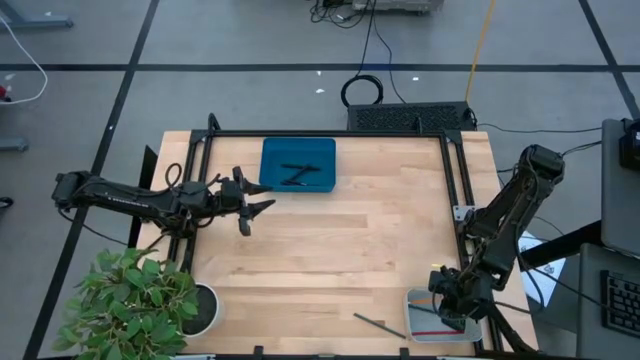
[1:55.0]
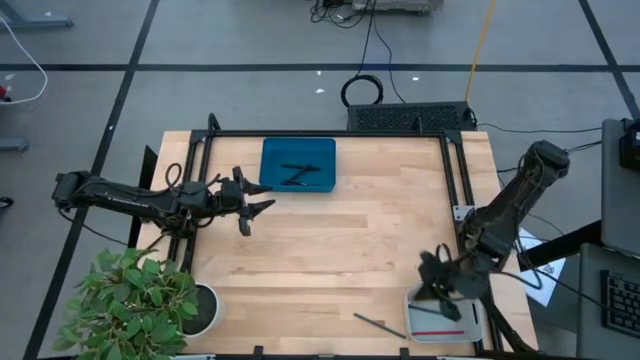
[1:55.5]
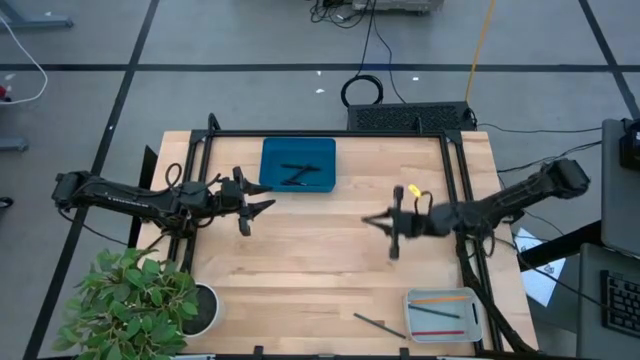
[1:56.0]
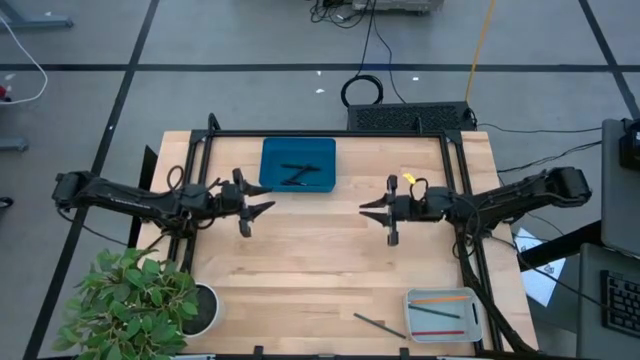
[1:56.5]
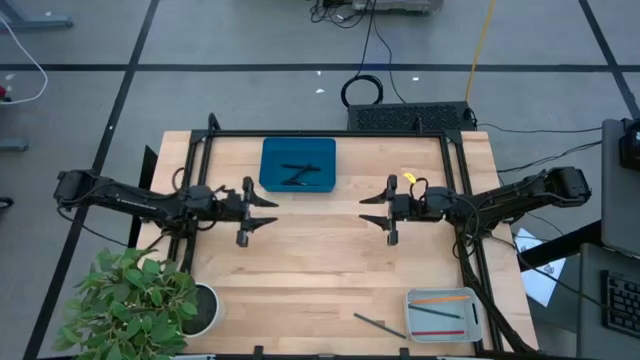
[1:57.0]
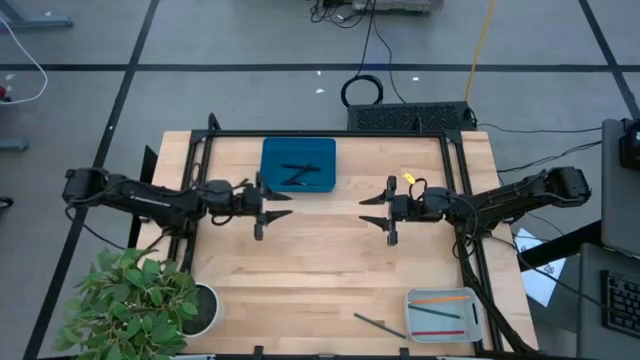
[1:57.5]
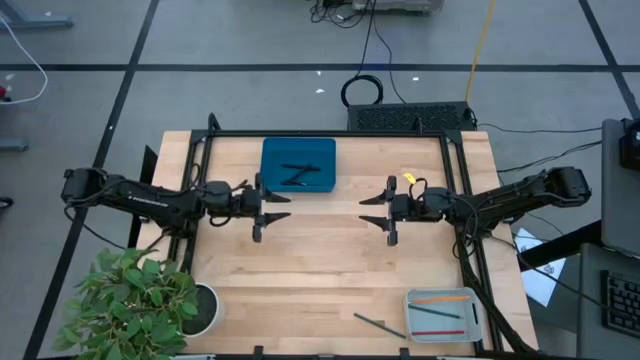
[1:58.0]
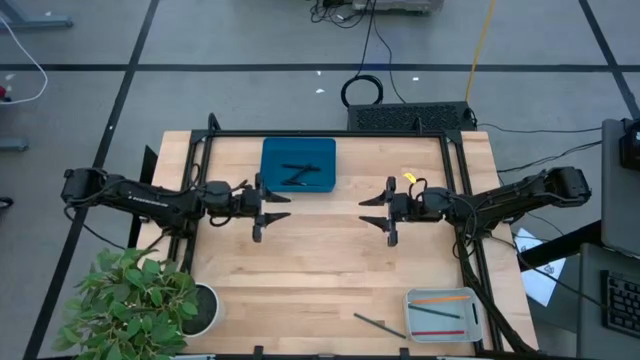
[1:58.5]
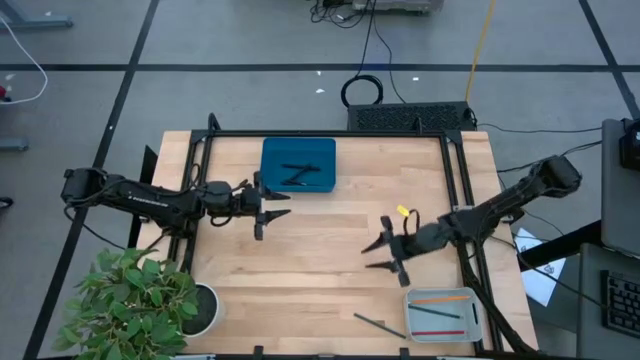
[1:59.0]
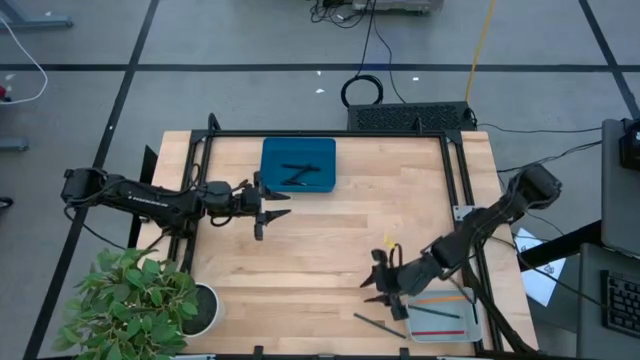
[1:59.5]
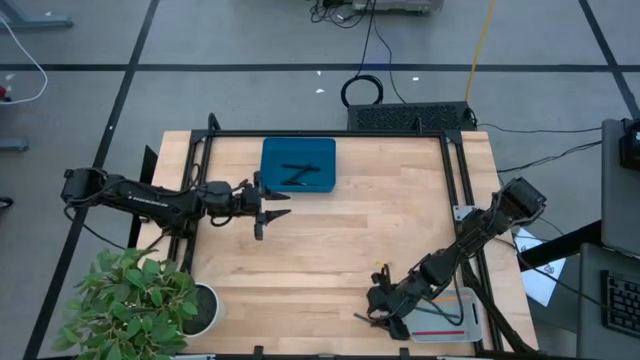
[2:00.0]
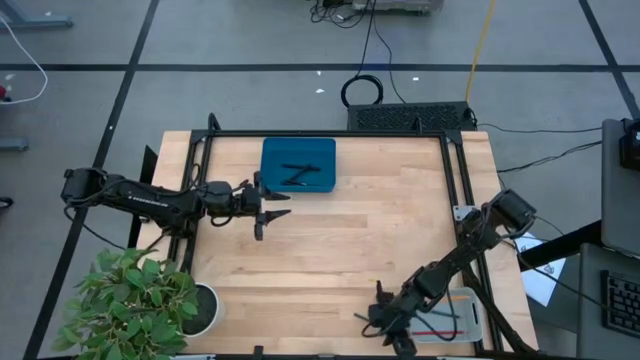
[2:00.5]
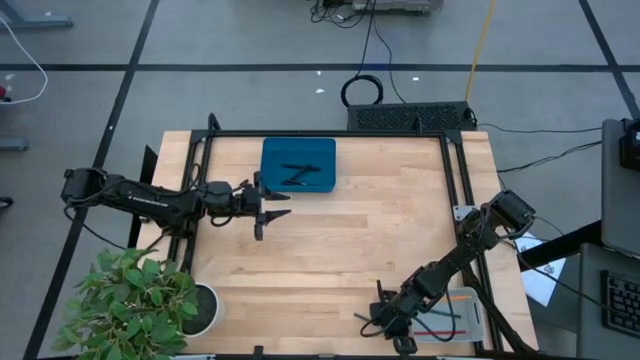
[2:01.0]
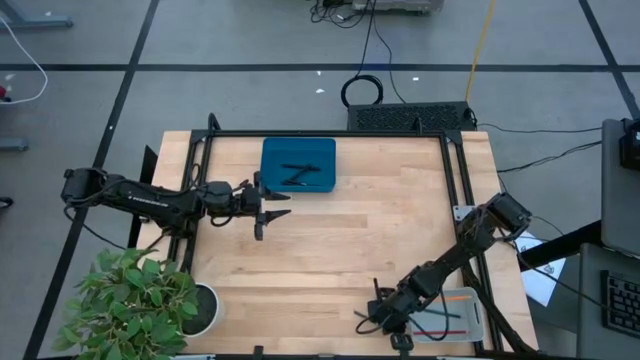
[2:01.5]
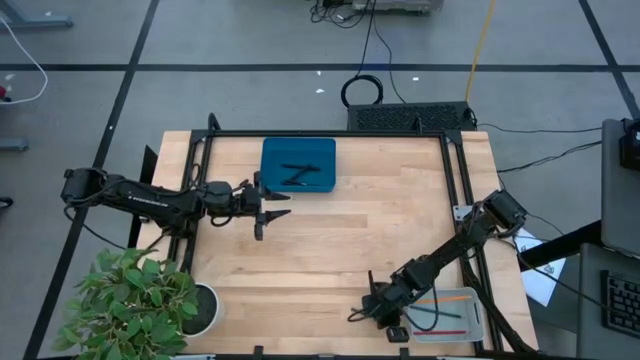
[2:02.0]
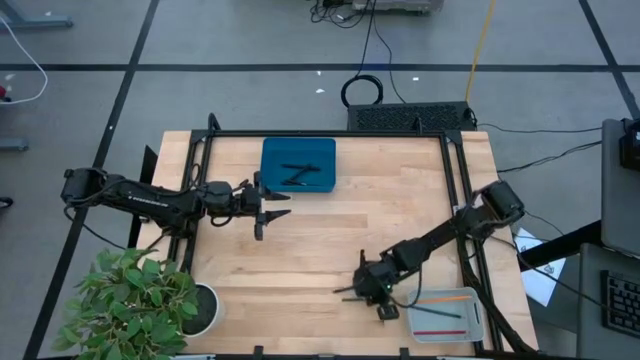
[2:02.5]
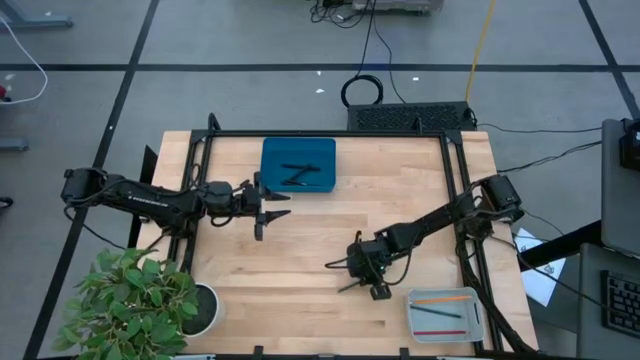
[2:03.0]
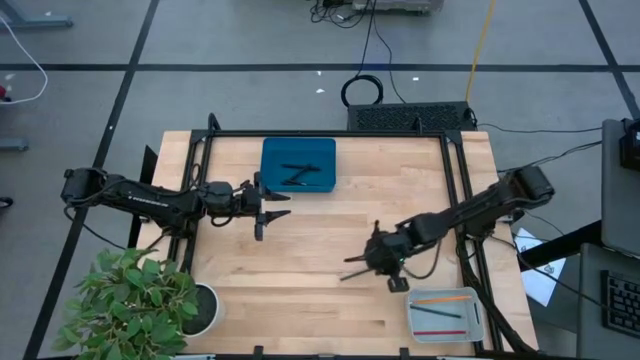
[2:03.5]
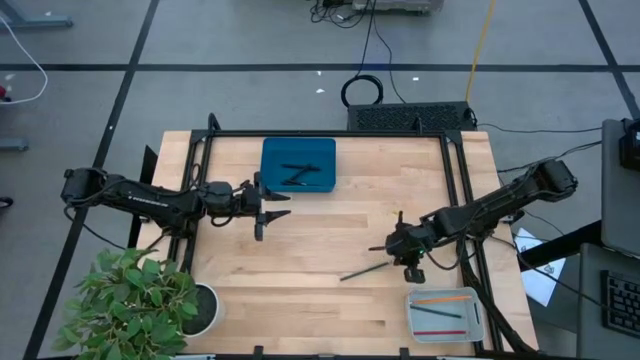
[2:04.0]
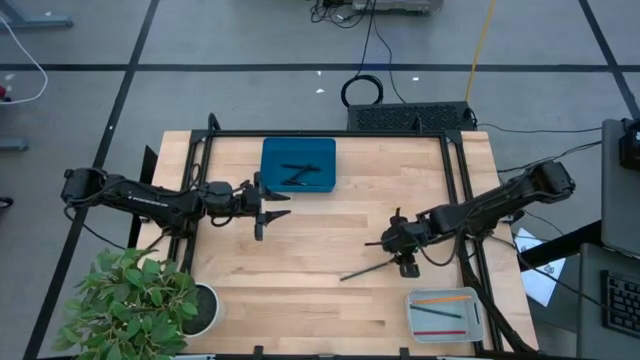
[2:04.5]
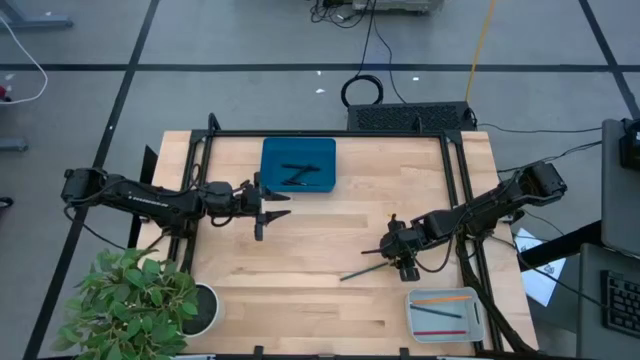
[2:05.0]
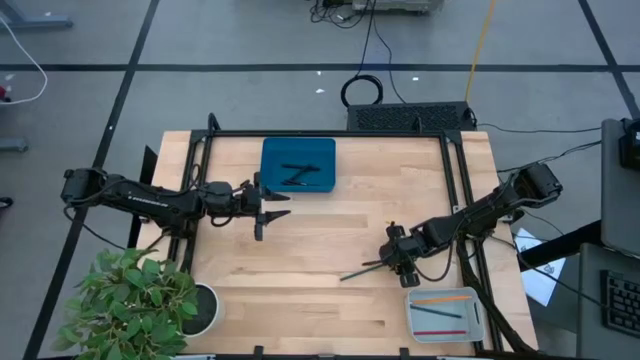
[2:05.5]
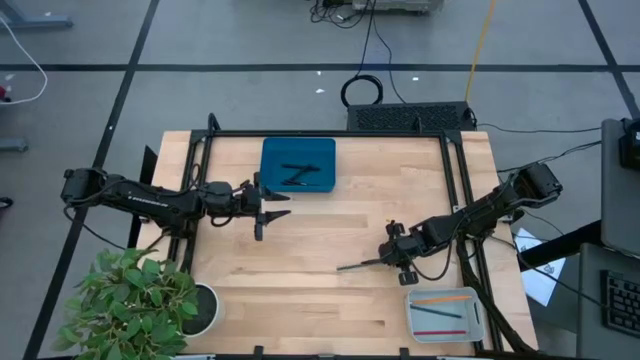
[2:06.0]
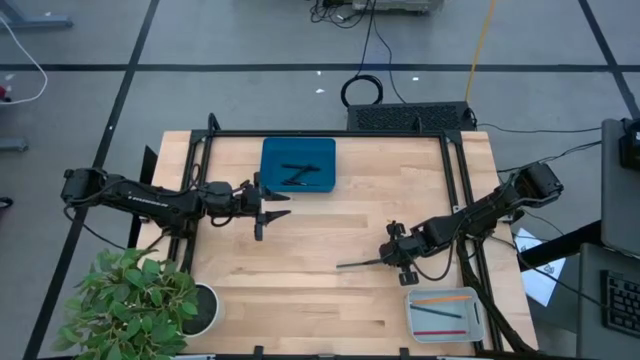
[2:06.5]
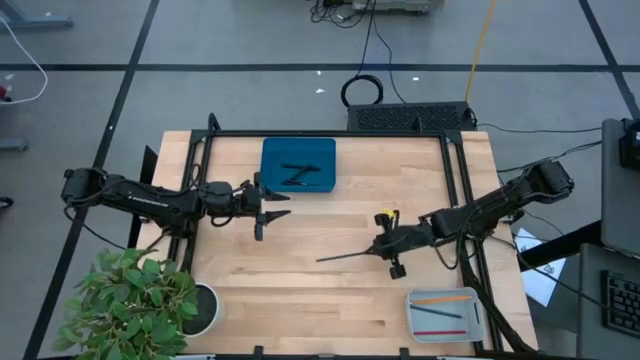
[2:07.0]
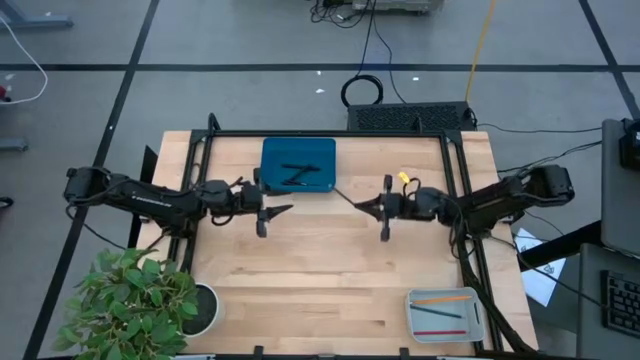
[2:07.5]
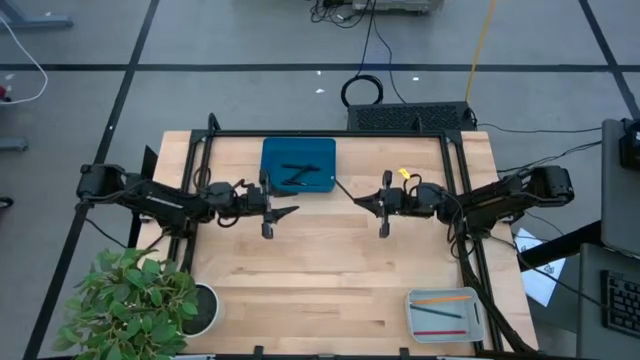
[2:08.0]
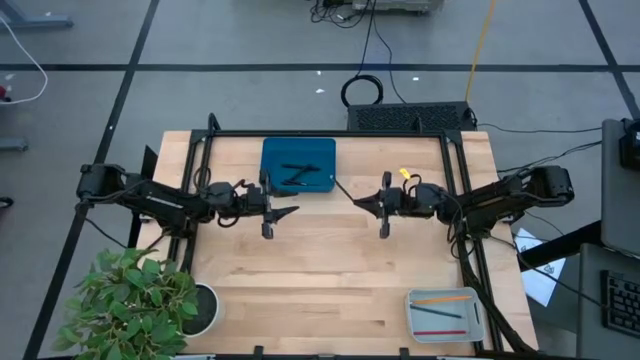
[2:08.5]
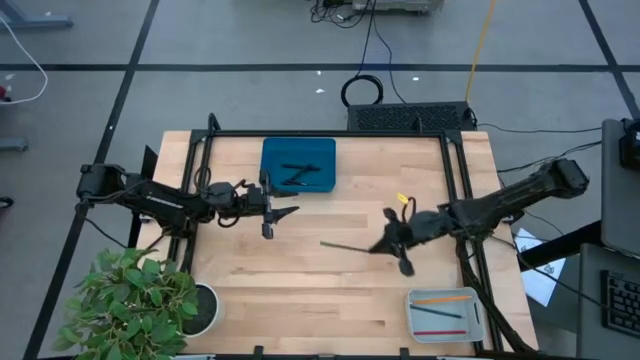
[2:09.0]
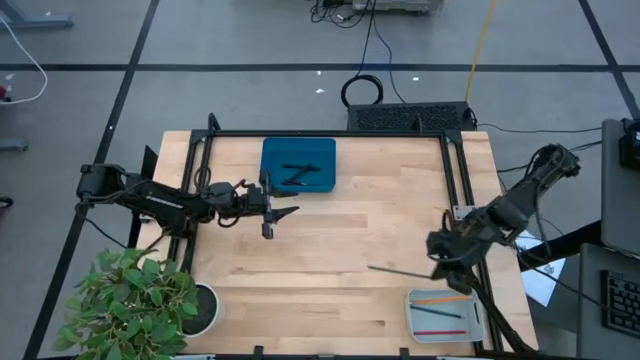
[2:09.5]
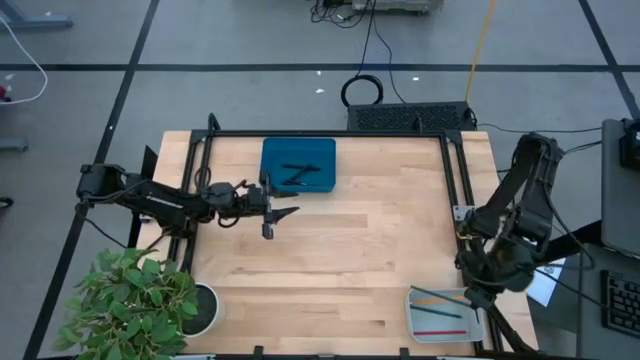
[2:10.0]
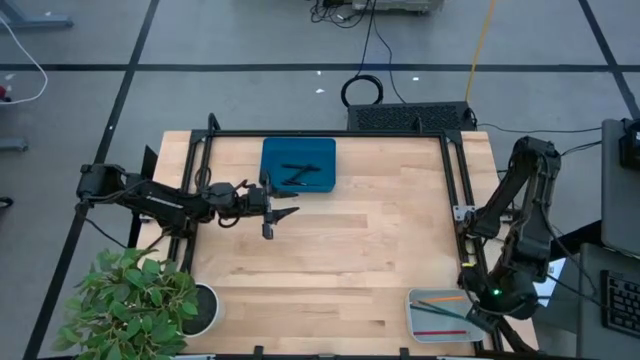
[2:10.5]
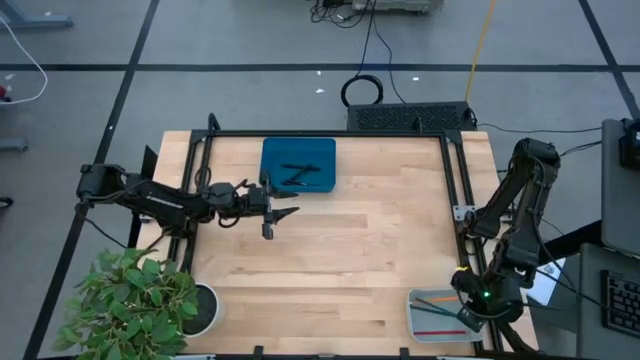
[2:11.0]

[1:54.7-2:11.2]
Task: Sort pens & pencils
Put the green pencil into the gray bin

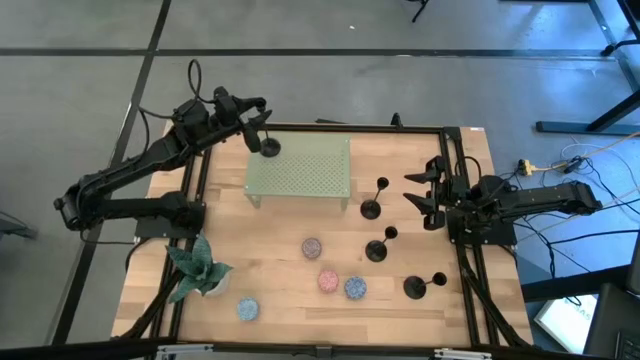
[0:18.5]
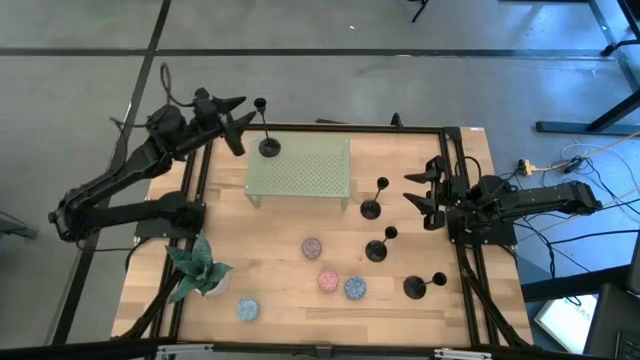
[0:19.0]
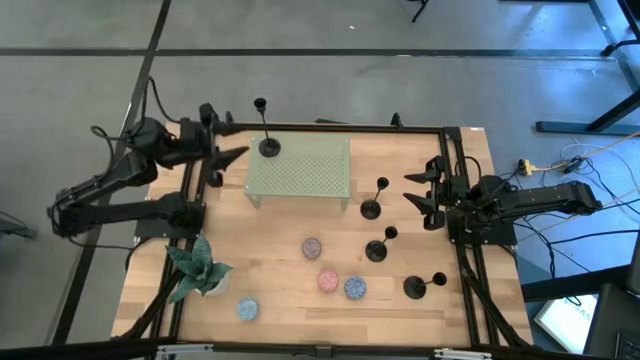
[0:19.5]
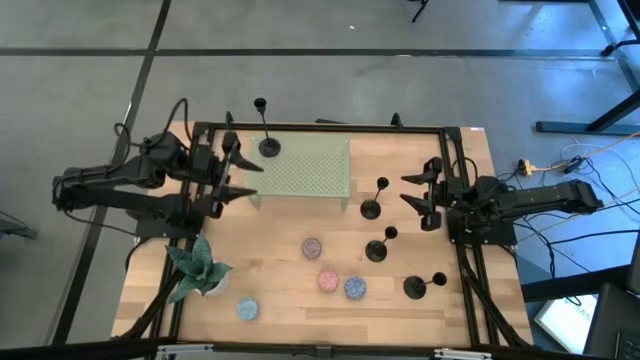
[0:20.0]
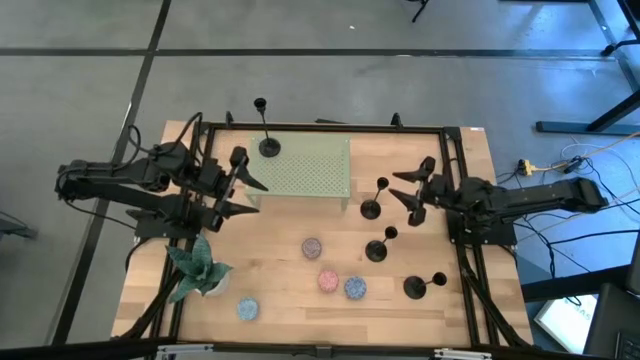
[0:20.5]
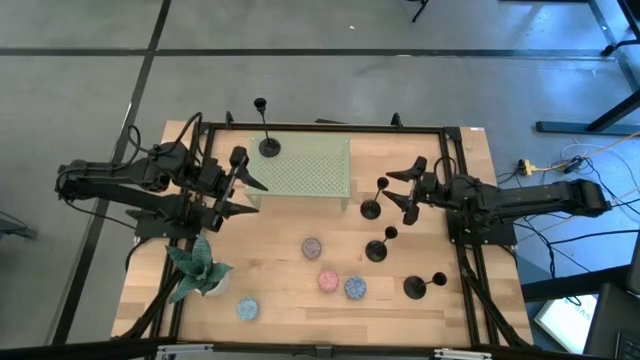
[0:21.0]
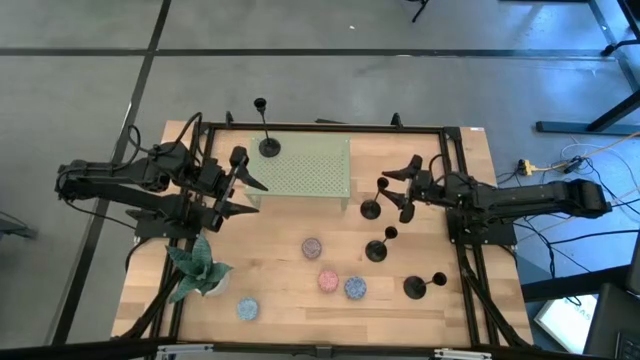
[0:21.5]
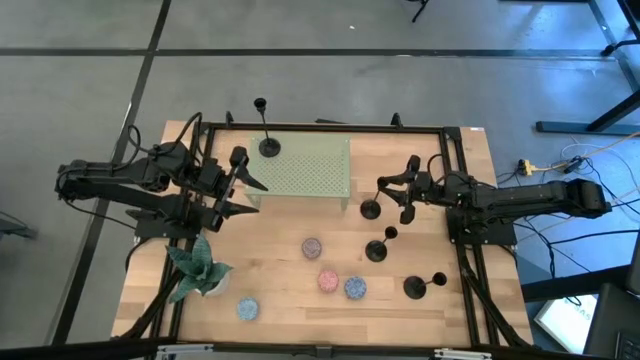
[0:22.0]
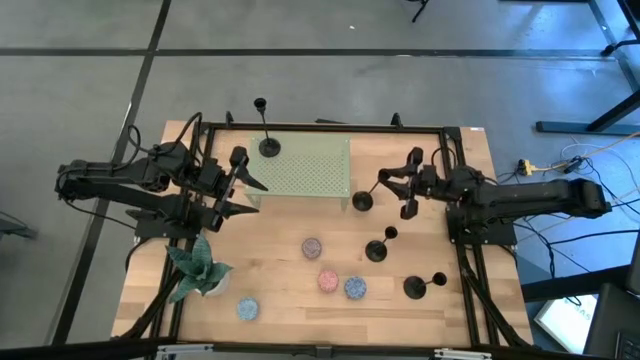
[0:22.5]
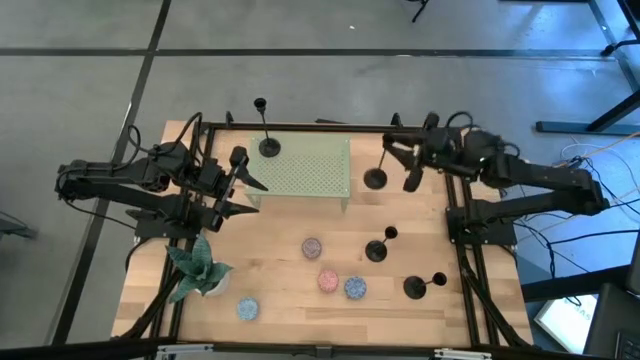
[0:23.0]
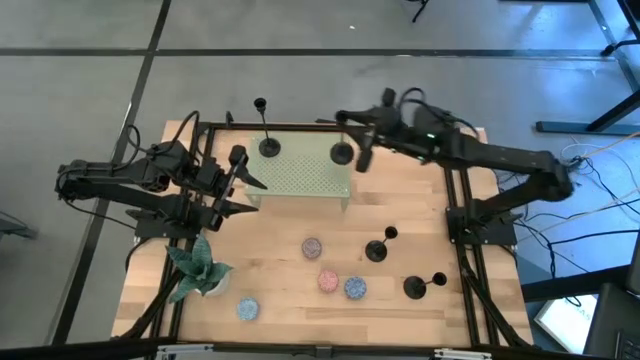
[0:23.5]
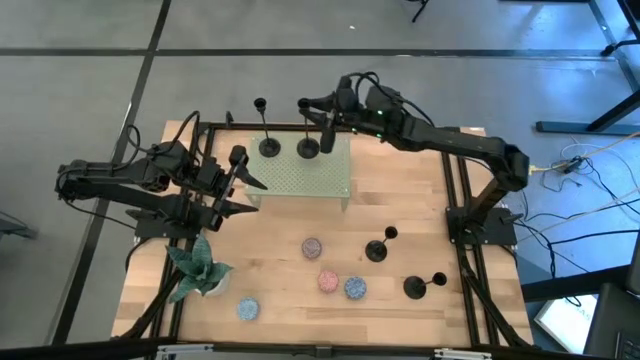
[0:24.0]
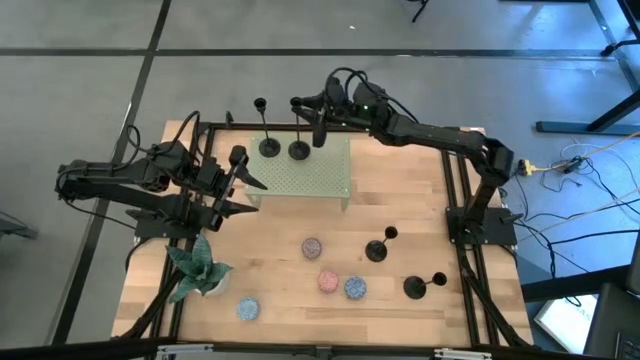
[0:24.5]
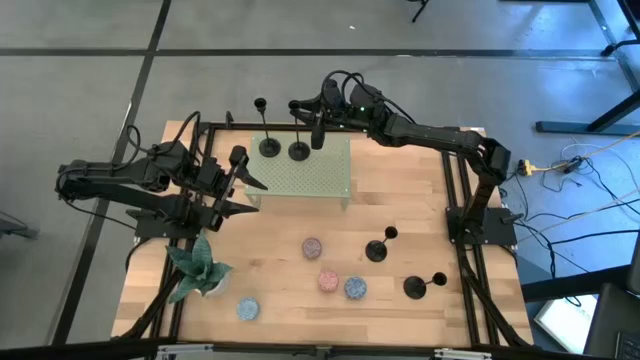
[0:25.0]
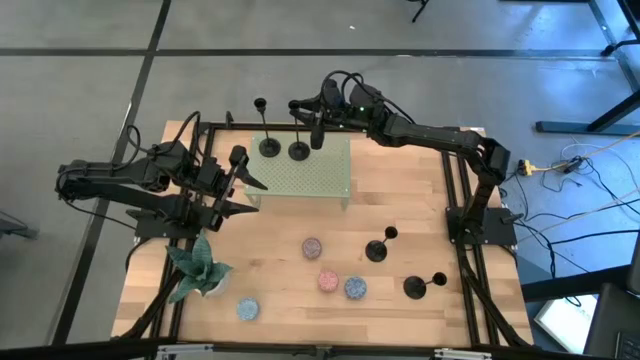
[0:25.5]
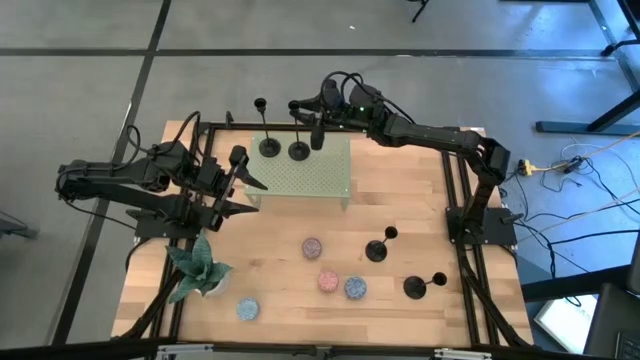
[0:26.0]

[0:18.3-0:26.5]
Task: Pick & Place candle stick holders
Align the black candle holder with the black candle holder on the shelf
